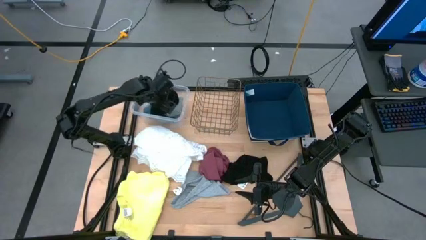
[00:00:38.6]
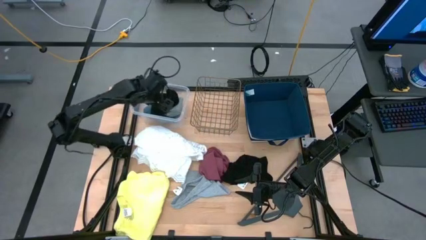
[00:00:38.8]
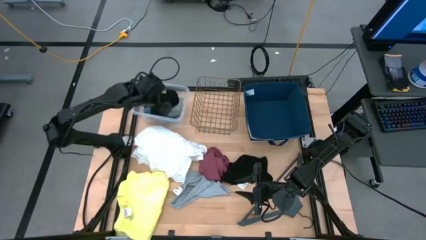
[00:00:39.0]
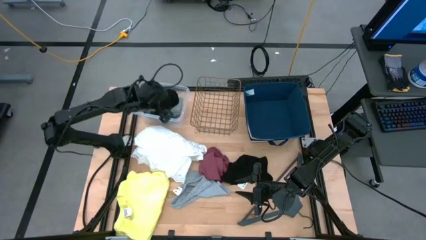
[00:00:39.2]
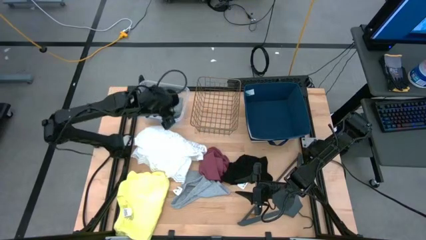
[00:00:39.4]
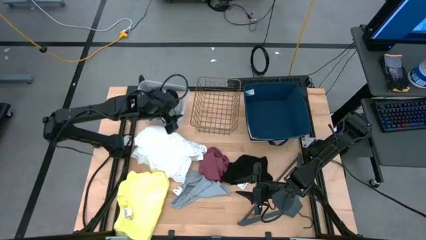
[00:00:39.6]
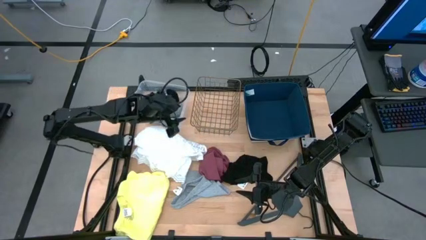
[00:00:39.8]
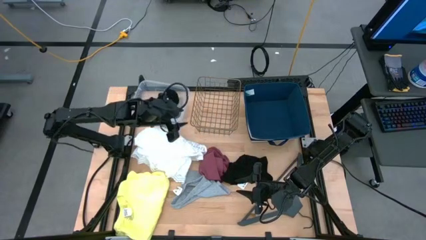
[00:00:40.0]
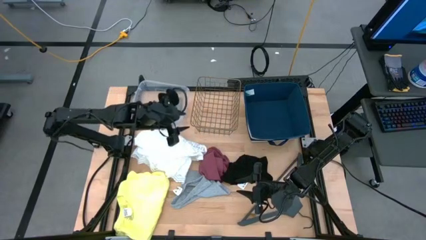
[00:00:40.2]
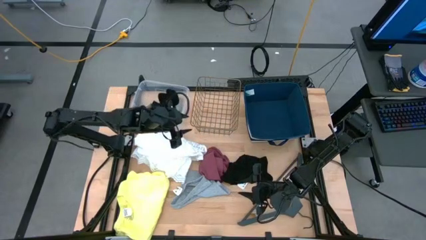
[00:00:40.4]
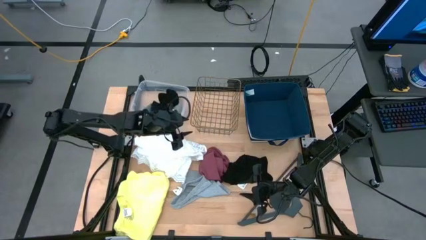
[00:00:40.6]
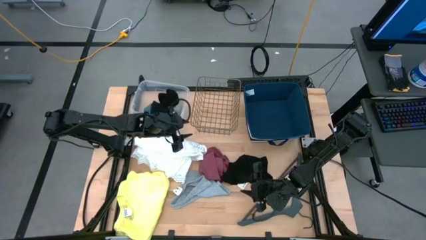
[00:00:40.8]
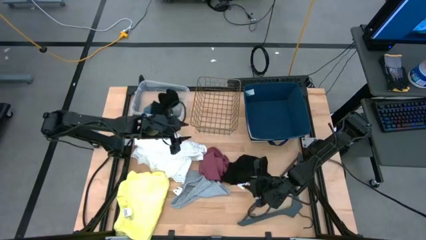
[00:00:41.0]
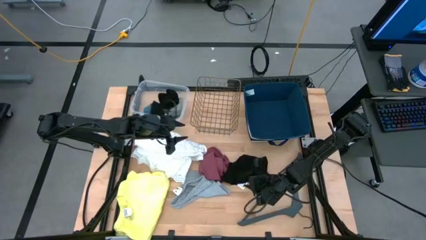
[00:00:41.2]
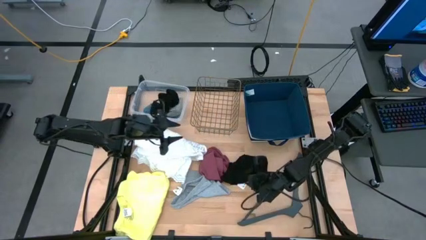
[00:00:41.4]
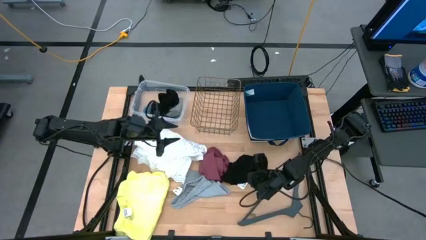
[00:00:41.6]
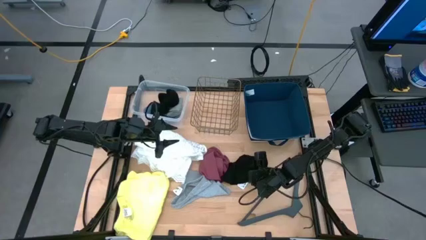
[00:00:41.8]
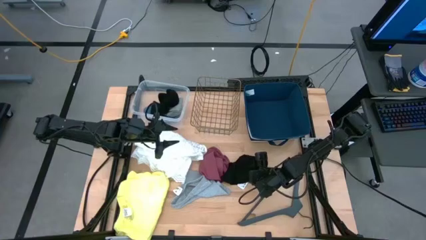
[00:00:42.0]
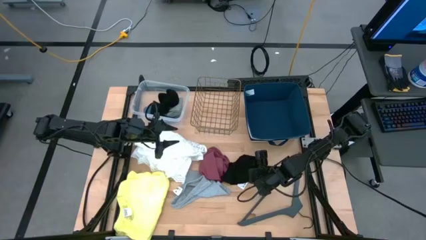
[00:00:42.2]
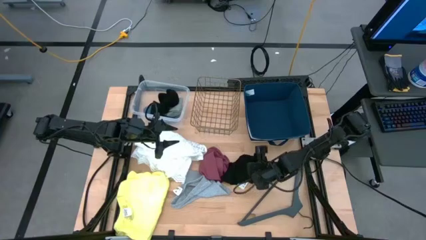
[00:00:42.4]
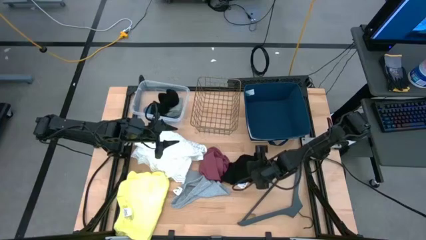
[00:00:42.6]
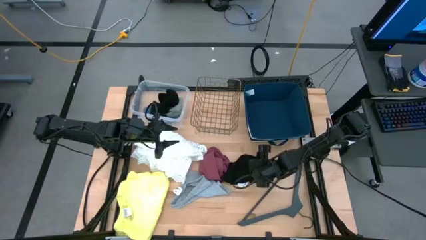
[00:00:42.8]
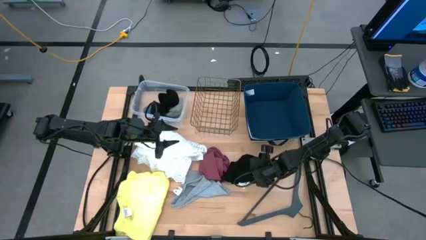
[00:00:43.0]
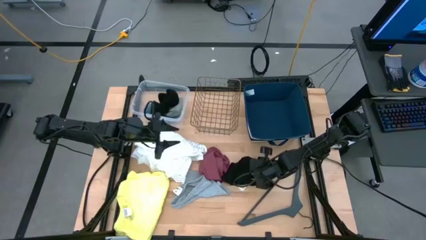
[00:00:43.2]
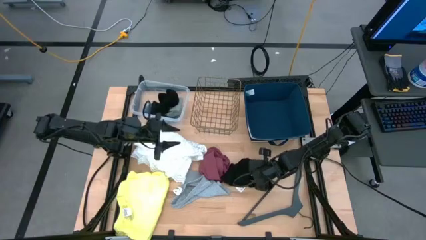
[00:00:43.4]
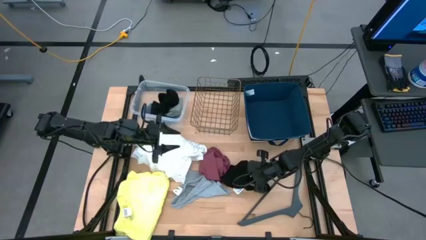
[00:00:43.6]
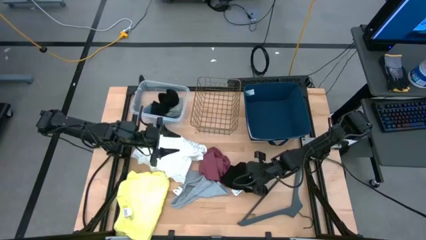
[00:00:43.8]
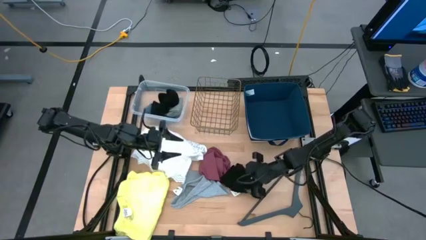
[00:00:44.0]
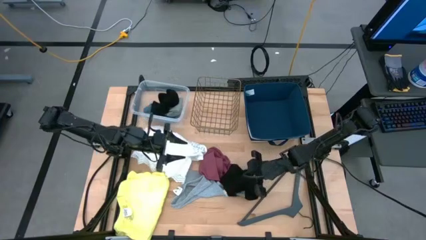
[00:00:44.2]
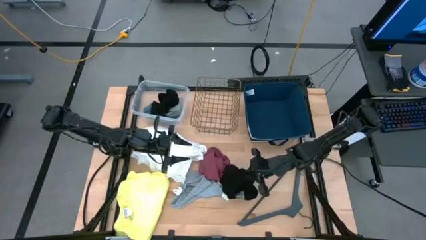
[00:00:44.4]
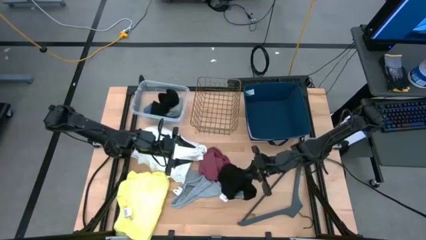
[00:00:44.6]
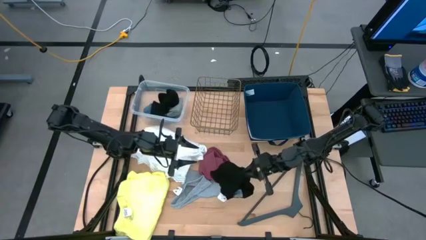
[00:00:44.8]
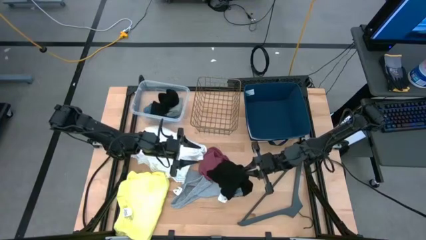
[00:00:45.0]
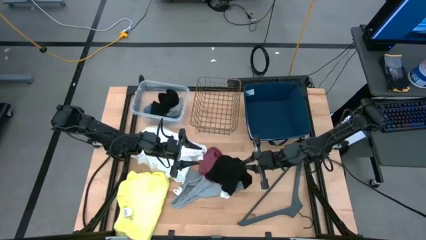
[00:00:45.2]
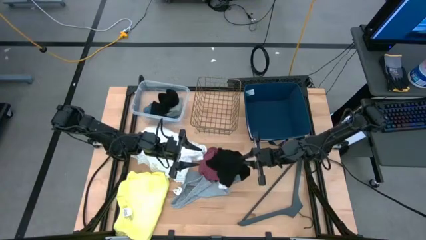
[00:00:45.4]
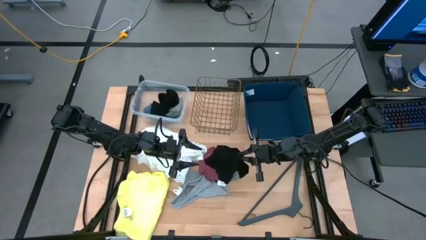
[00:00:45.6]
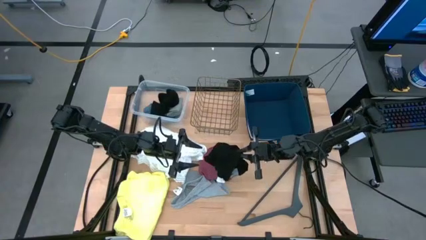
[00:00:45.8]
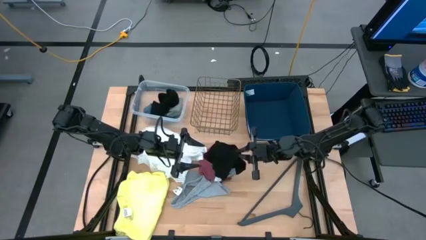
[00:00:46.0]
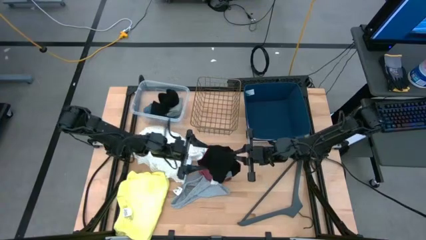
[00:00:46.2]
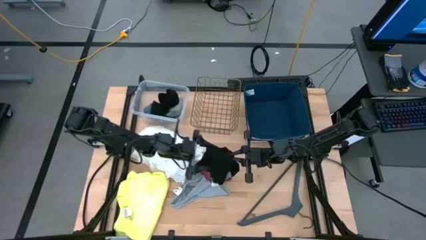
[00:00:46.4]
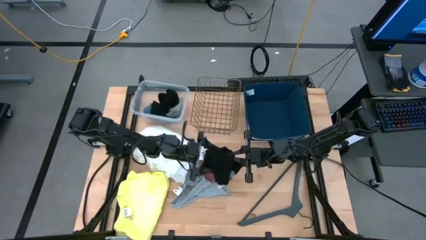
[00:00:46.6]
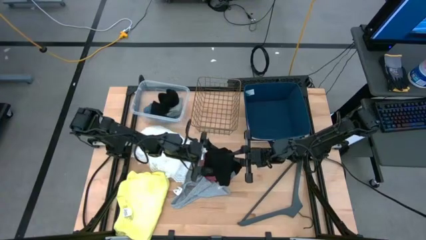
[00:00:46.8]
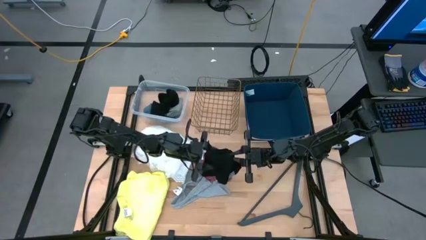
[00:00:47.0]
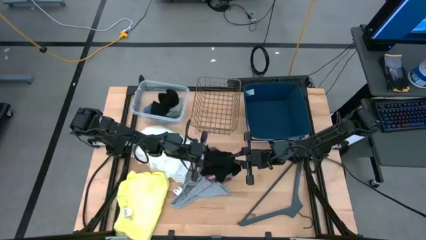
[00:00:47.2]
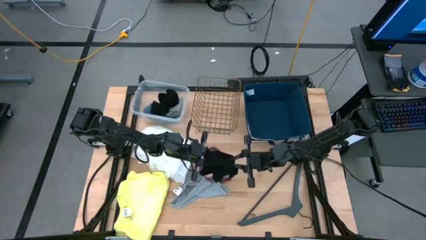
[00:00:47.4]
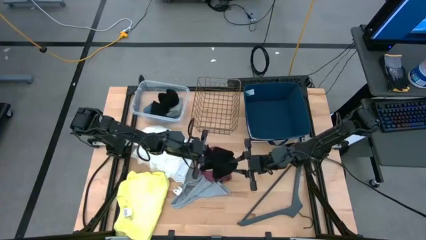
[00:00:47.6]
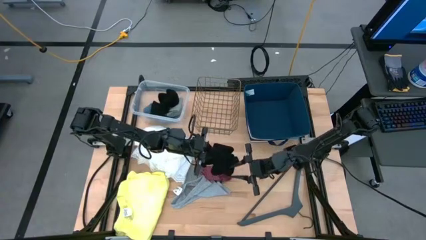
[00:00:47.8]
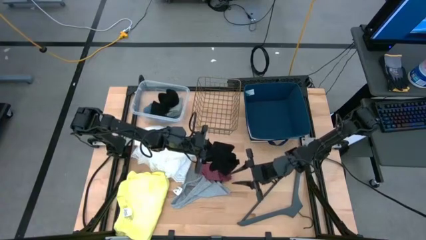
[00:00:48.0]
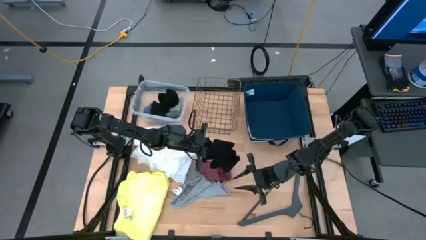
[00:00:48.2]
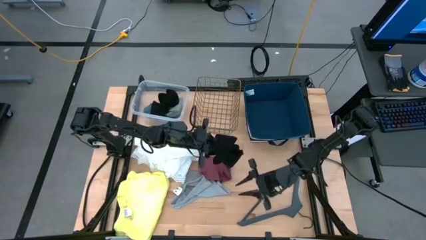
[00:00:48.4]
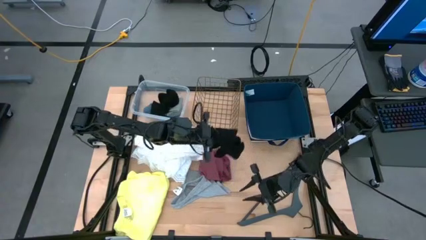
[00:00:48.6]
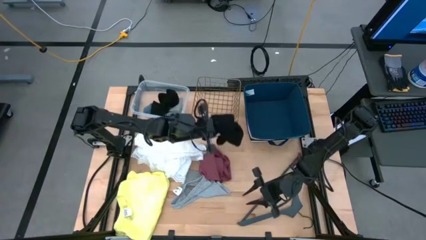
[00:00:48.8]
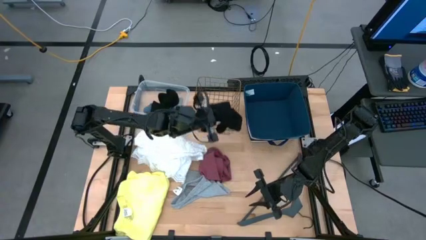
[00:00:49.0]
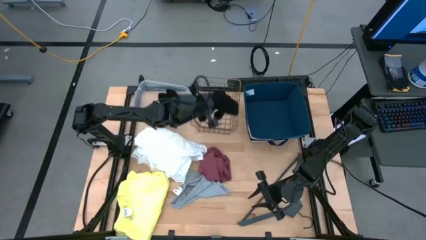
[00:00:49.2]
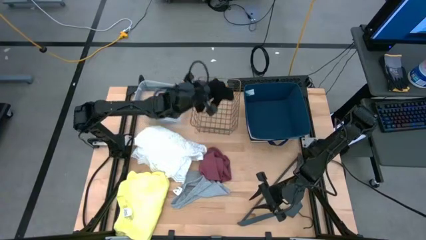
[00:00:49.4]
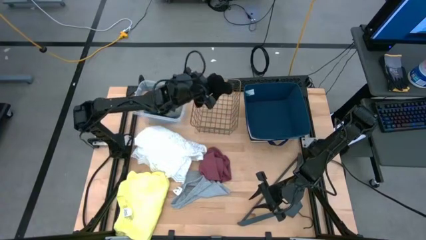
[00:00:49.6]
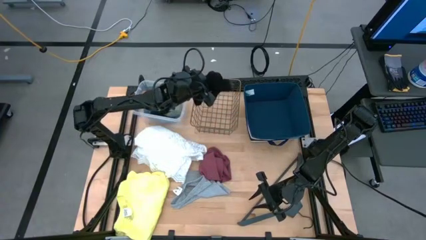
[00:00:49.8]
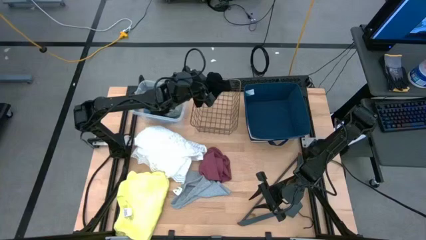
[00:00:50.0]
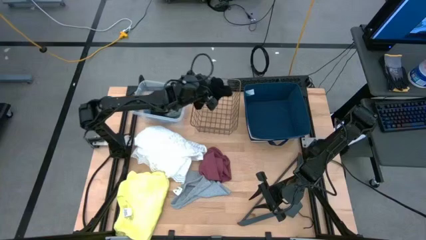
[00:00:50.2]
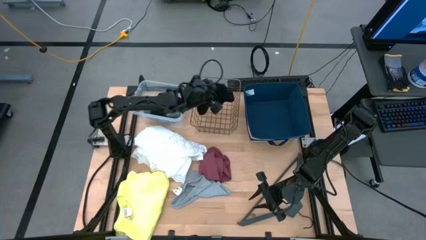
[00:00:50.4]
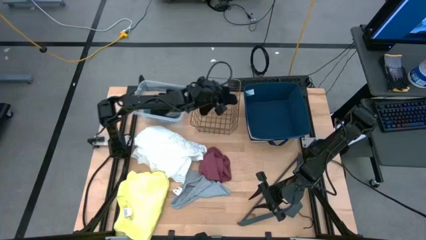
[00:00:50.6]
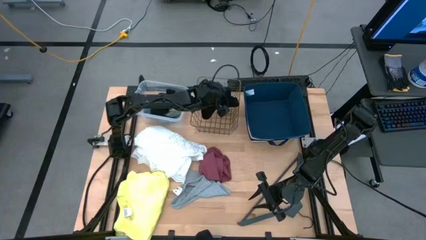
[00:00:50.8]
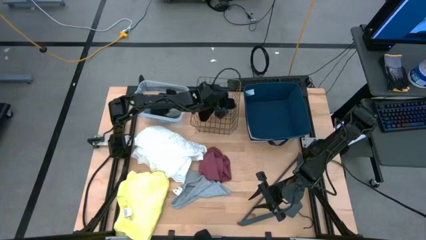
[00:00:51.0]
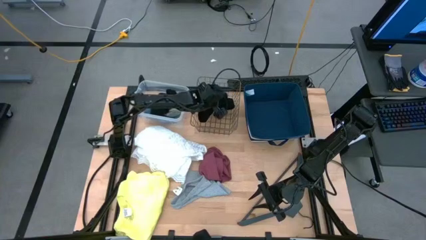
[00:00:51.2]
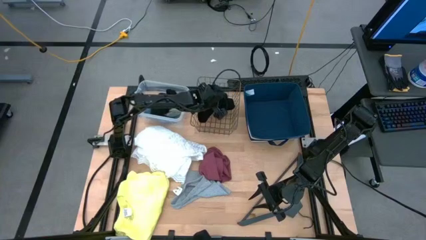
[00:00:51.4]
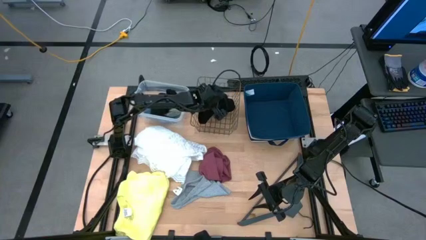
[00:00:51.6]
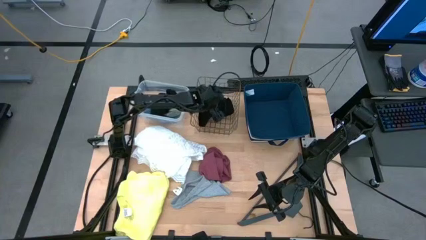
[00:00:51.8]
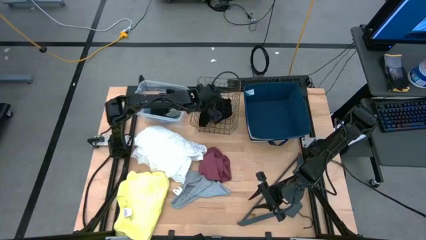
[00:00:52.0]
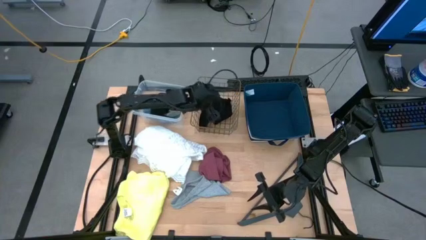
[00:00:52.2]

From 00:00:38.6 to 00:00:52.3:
Task: Pick & Place Cloths
Put the black underwear into the wire basket
